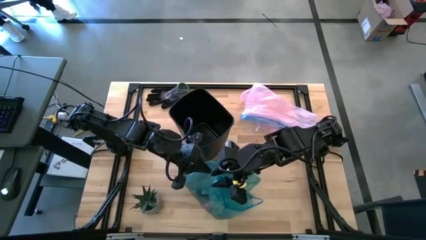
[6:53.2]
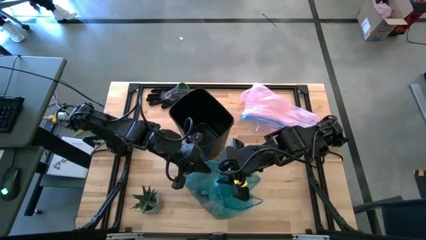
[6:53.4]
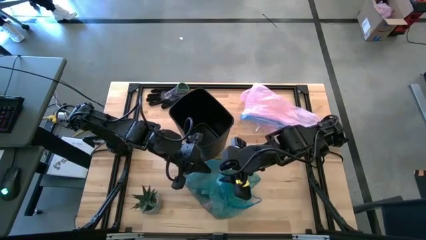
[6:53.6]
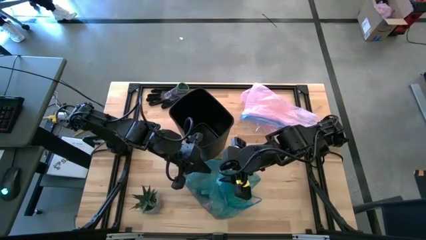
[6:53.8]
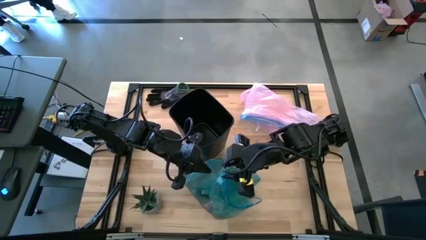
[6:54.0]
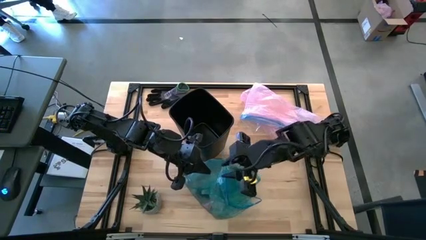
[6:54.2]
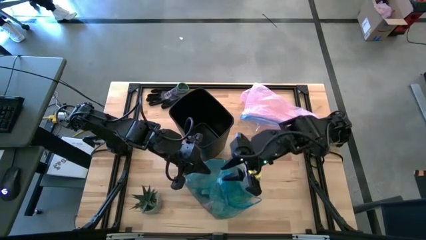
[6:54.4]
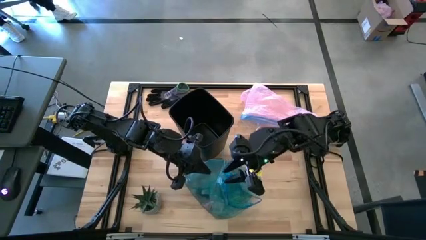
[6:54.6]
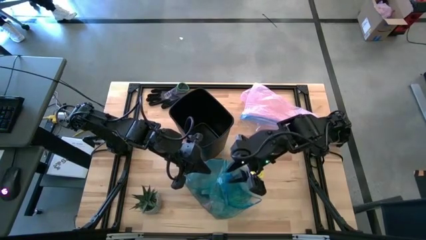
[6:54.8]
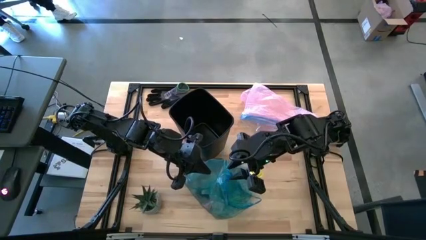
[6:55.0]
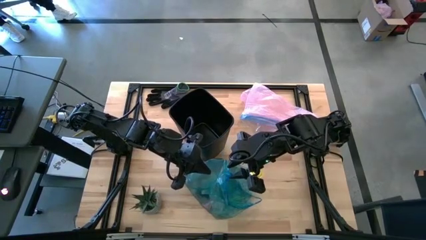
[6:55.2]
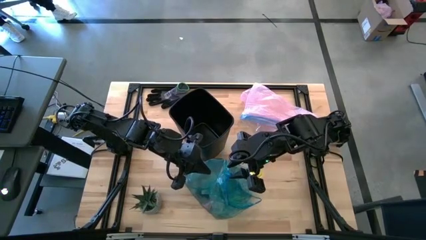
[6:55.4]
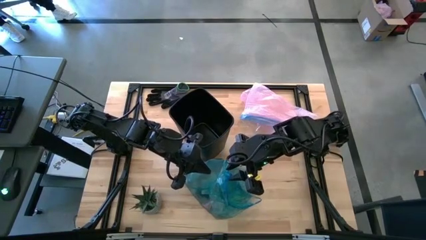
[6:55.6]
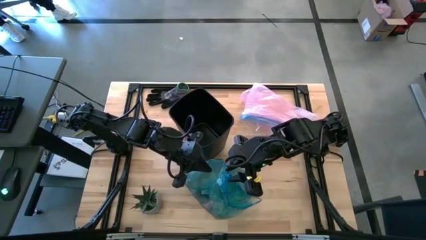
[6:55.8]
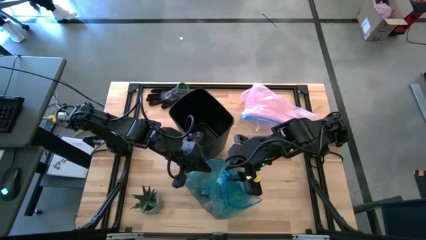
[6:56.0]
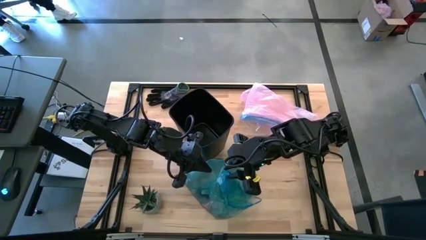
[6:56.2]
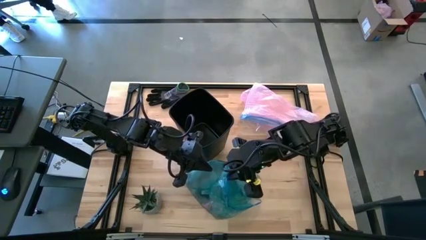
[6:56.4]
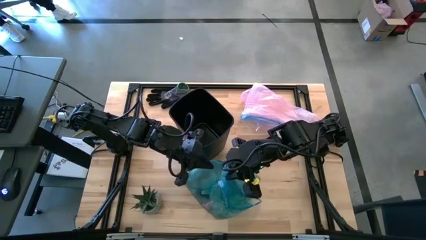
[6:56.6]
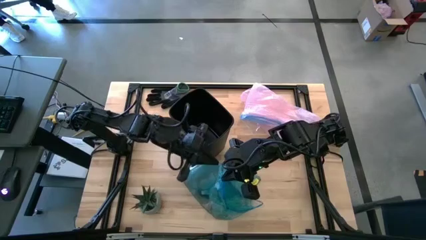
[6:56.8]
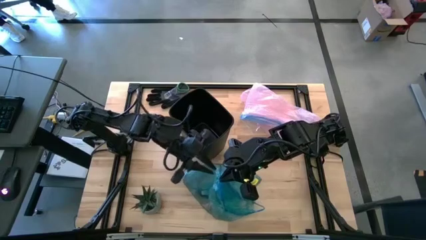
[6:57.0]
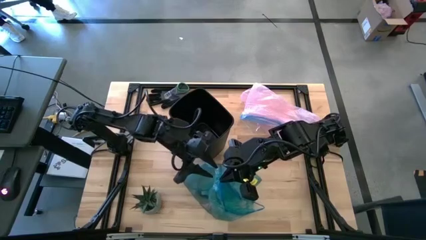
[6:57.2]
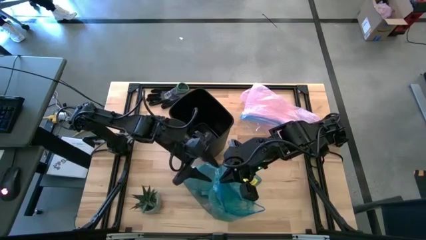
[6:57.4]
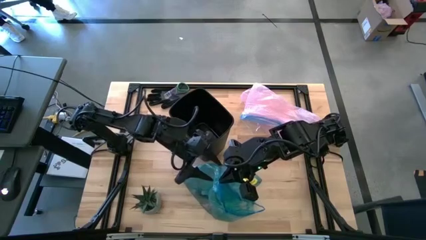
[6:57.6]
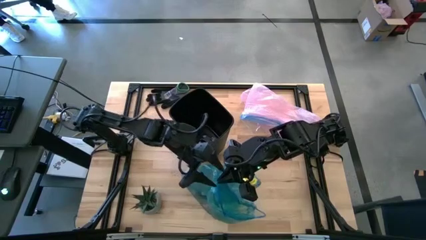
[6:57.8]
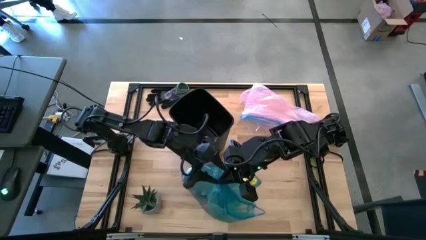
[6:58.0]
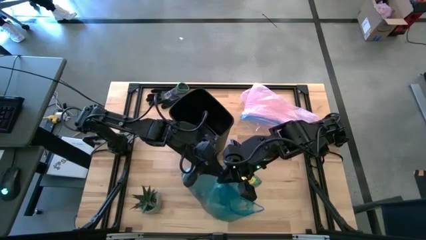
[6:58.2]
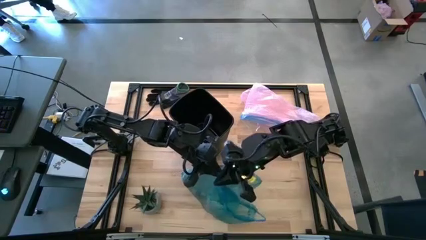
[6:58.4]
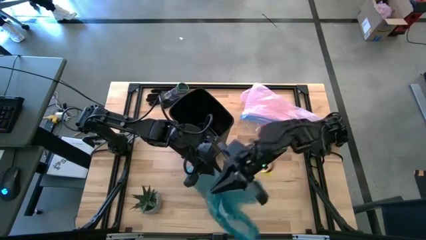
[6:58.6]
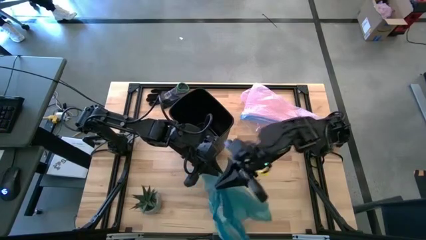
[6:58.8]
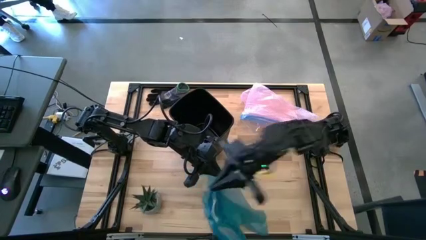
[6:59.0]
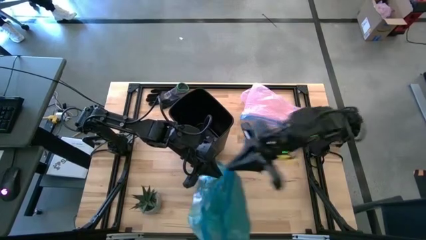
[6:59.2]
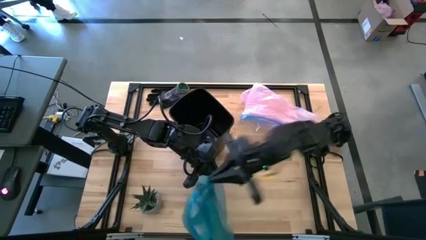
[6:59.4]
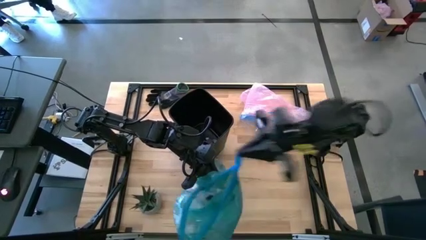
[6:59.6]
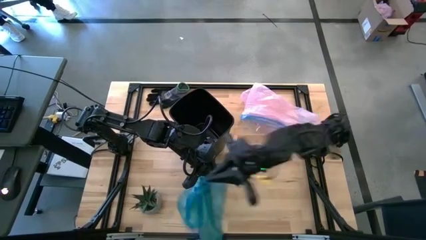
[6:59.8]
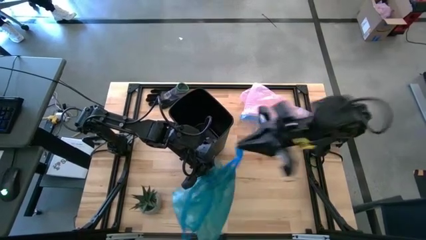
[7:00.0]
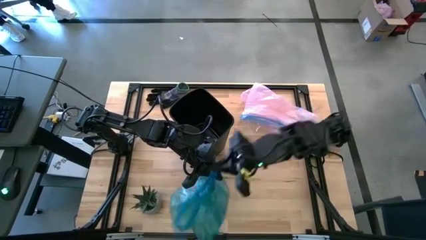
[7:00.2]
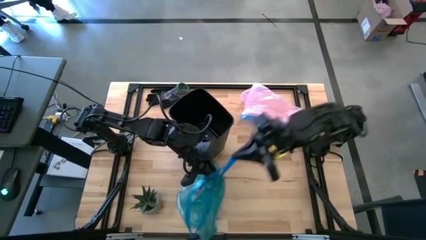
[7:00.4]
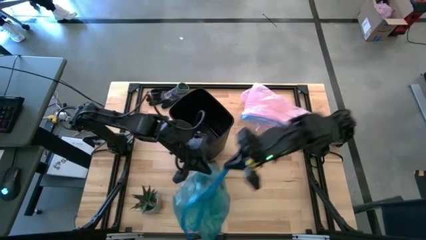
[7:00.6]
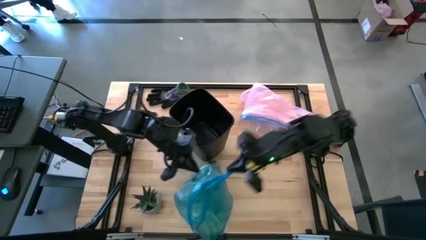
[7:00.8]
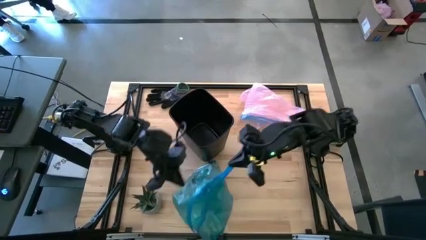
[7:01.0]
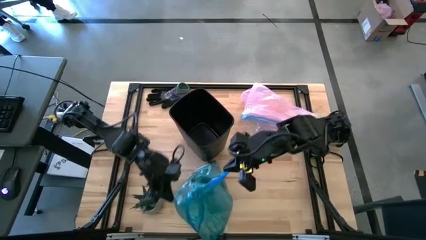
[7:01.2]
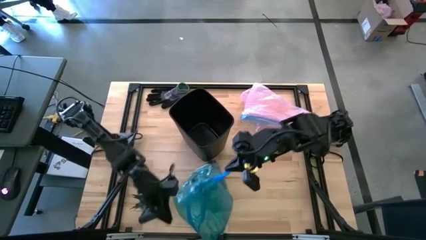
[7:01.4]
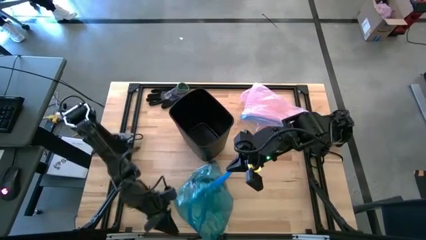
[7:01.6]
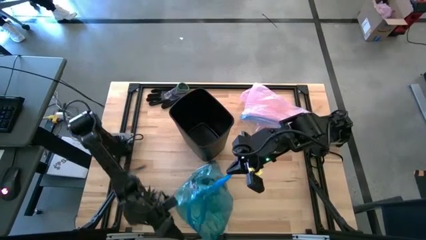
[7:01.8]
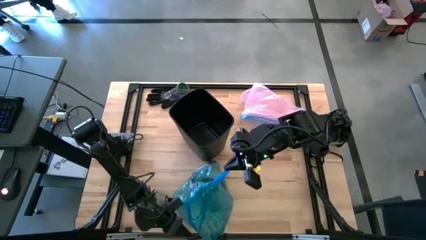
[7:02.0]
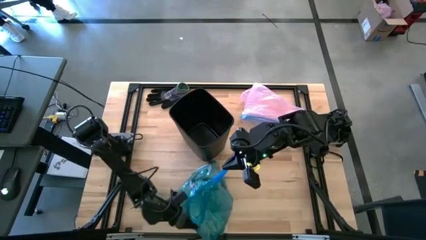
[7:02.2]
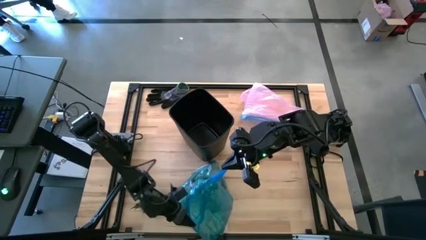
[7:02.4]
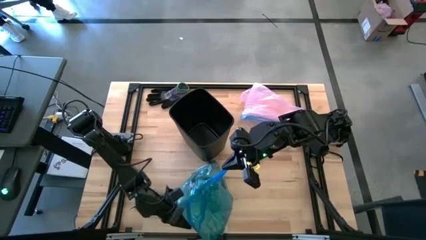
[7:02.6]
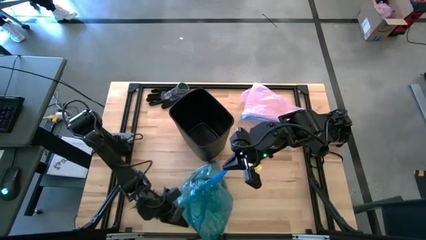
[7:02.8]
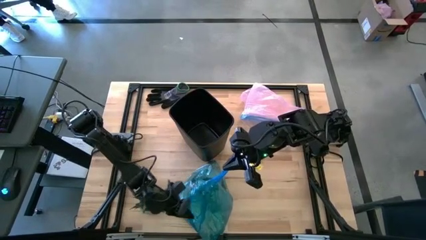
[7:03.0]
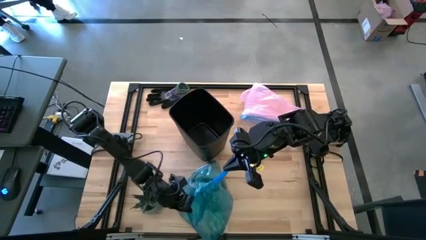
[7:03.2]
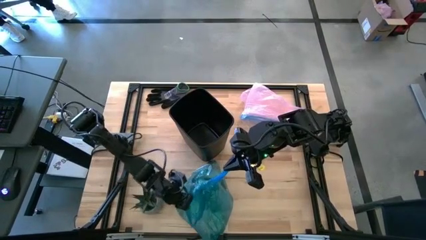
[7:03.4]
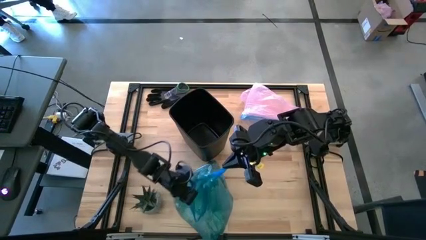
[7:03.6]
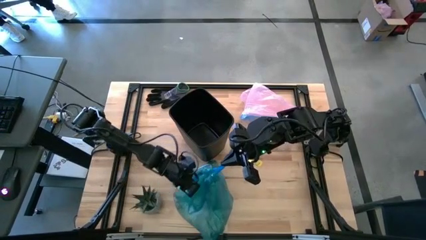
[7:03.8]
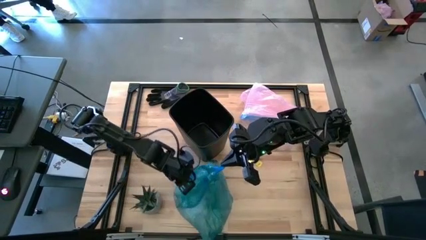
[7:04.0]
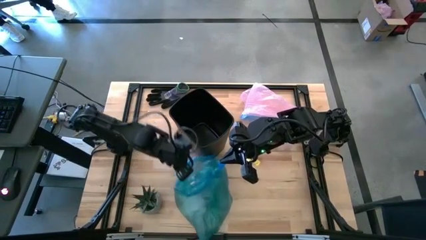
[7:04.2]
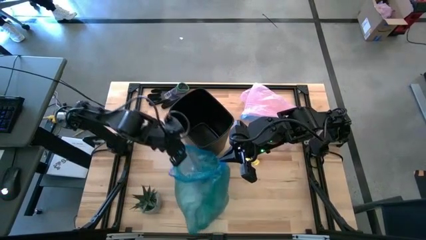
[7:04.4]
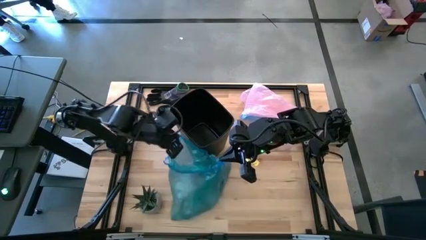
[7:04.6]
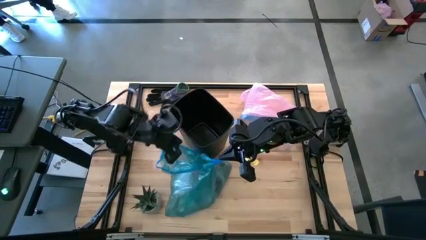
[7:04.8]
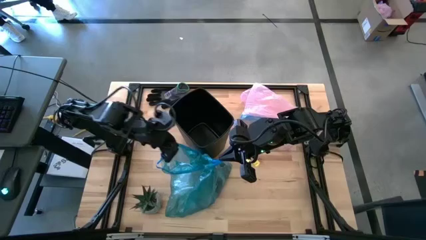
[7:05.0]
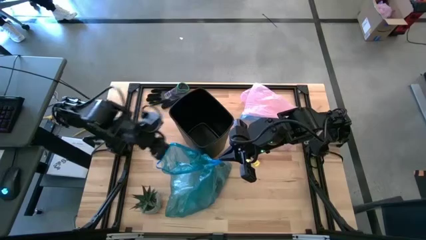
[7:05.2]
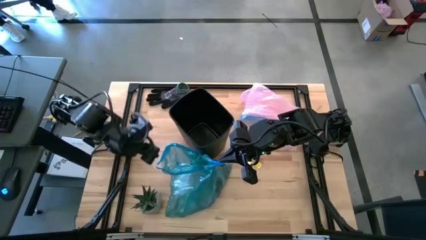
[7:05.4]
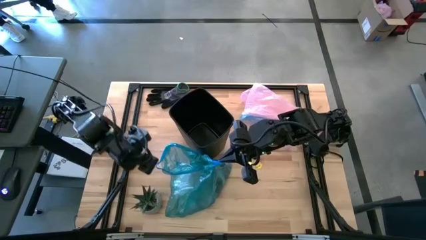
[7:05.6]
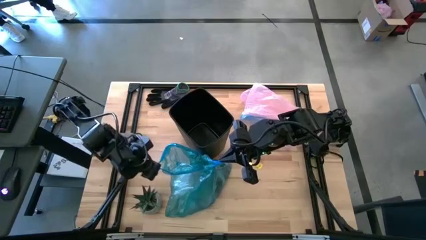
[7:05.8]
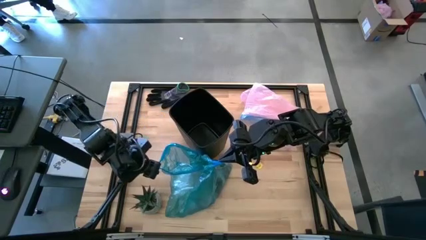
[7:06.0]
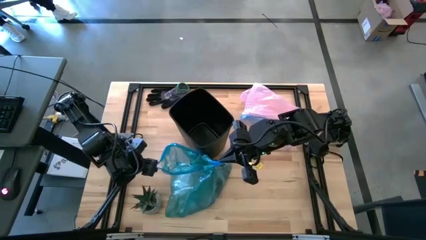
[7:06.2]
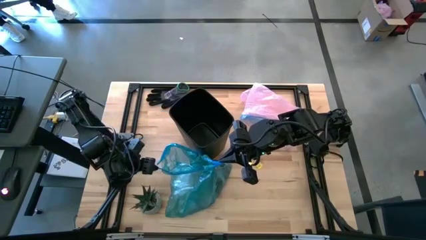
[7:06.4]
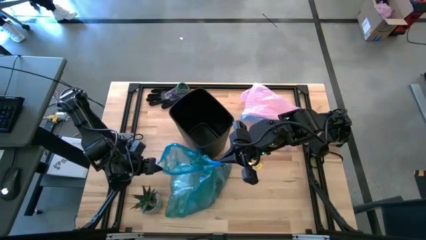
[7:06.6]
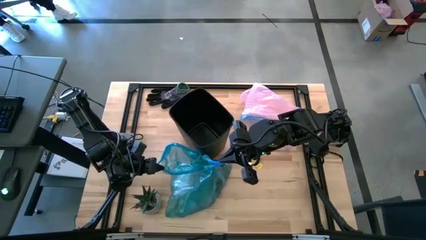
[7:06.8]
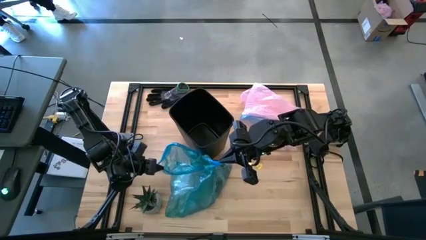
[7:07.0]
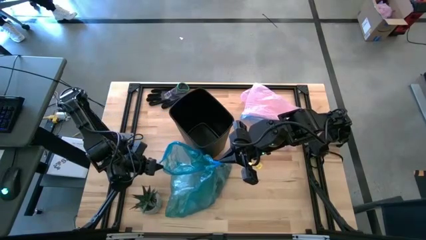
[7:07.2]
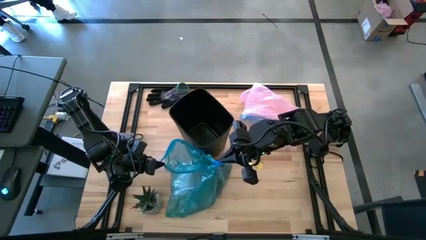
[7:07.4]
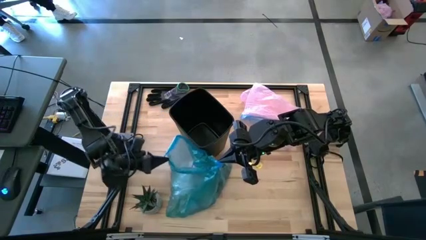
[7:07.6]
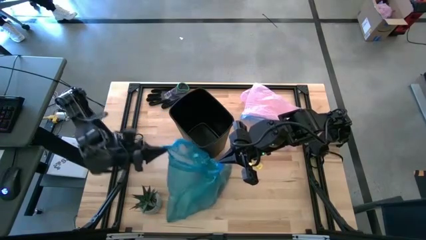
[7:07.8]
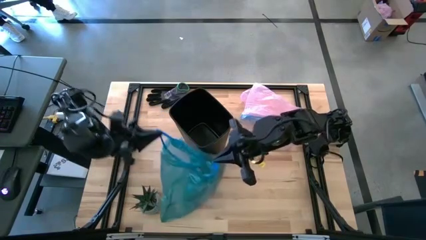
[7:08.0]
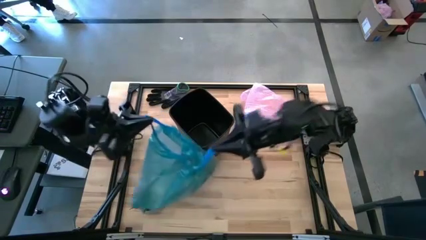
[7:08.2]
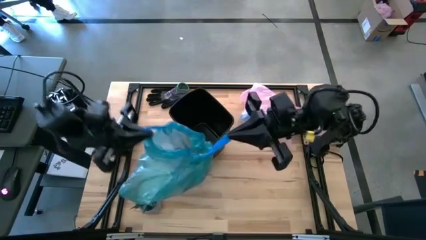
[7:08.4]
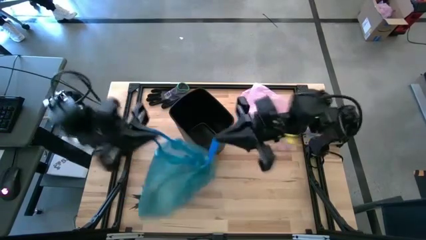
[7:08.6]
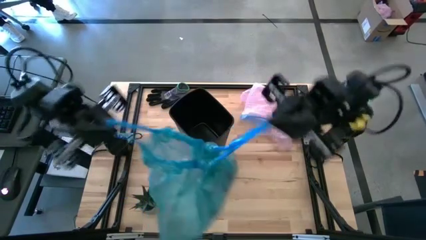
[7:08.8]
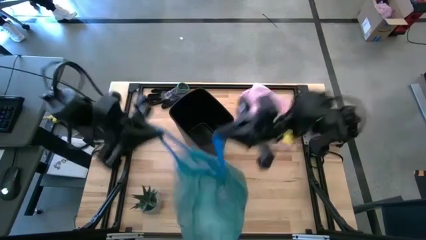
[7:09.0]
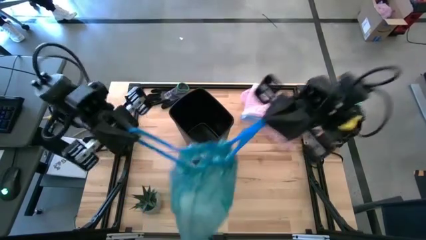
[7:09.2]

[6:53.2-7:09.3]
Task: place trash/remove bag and relplace
Close the blue trash bag
